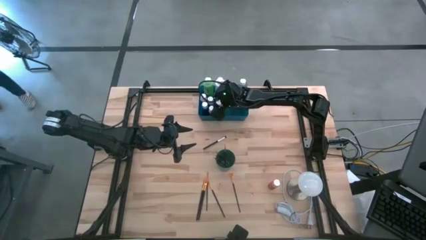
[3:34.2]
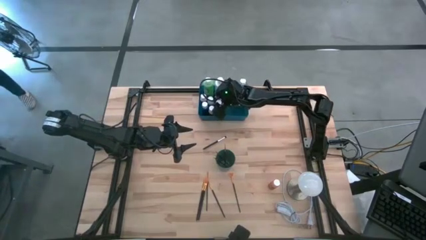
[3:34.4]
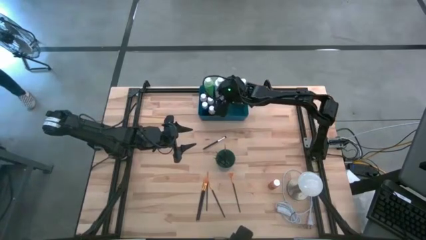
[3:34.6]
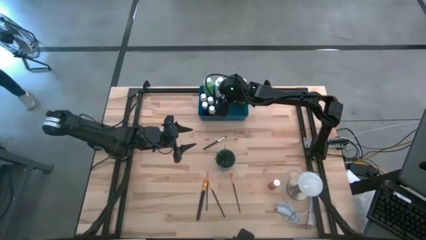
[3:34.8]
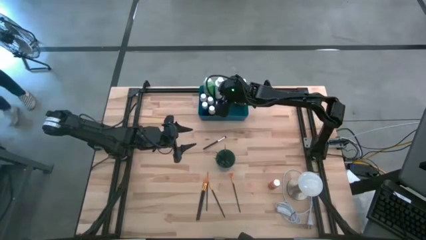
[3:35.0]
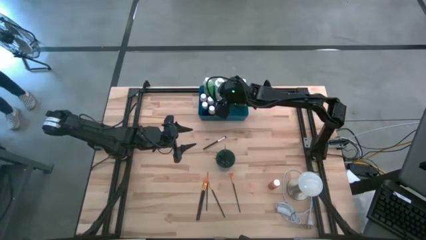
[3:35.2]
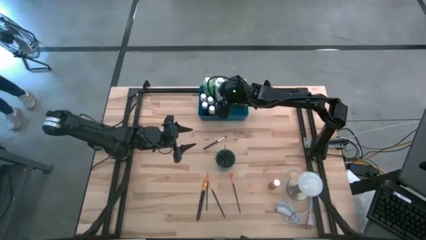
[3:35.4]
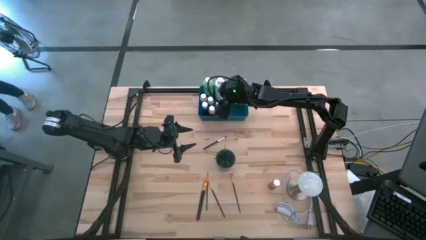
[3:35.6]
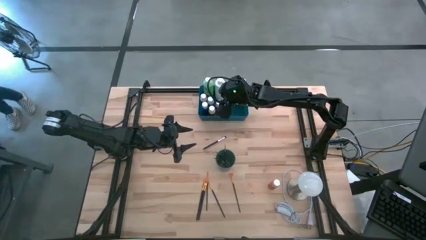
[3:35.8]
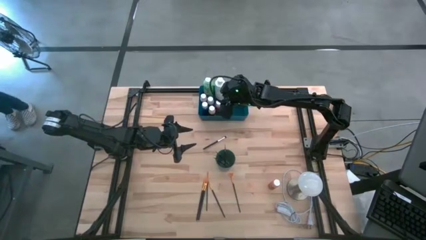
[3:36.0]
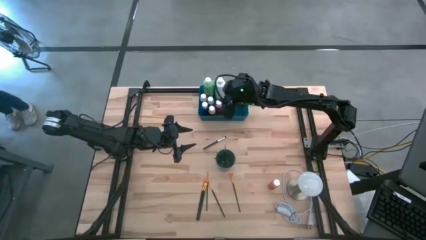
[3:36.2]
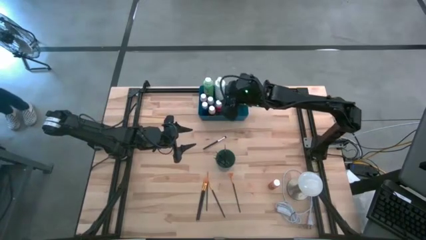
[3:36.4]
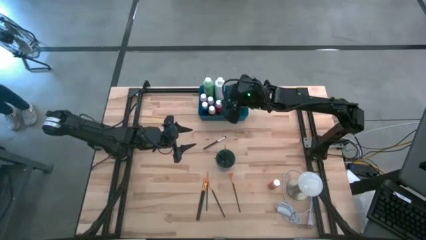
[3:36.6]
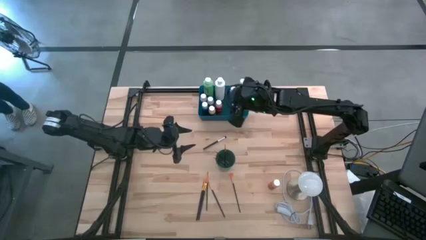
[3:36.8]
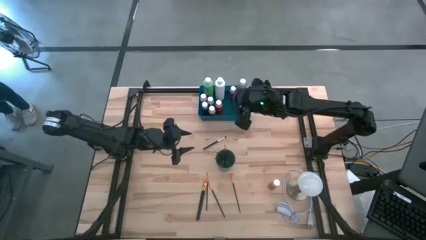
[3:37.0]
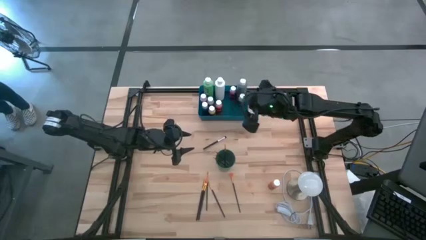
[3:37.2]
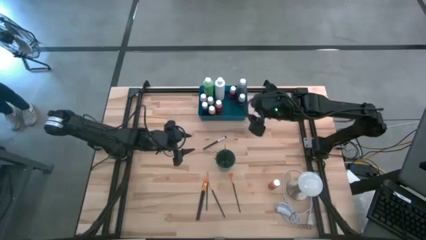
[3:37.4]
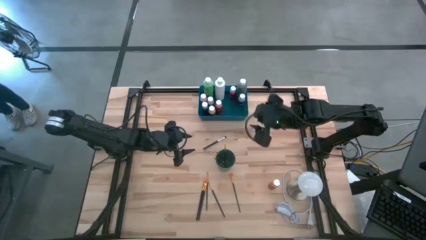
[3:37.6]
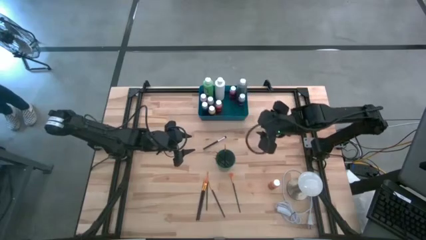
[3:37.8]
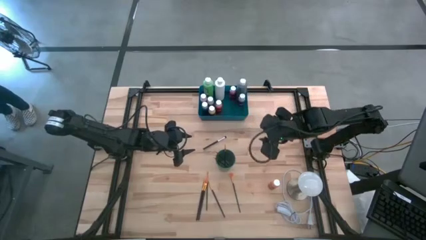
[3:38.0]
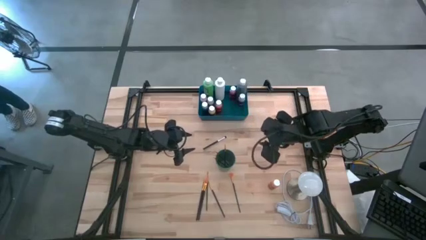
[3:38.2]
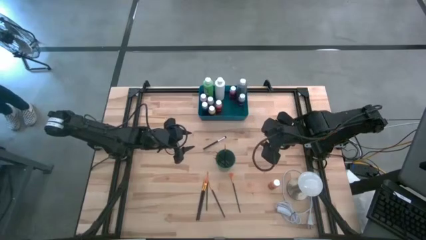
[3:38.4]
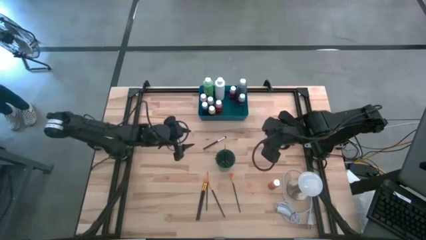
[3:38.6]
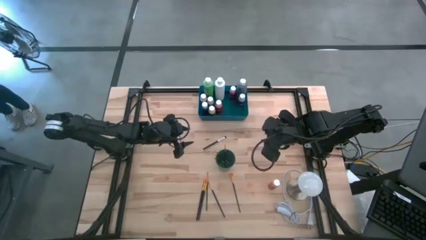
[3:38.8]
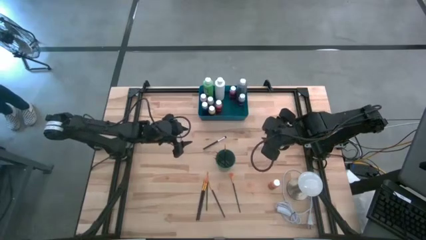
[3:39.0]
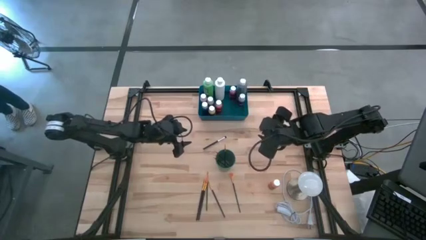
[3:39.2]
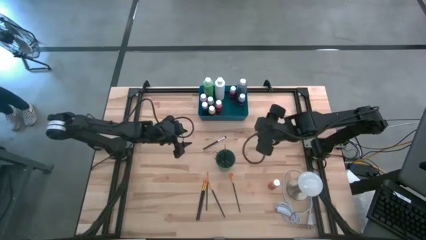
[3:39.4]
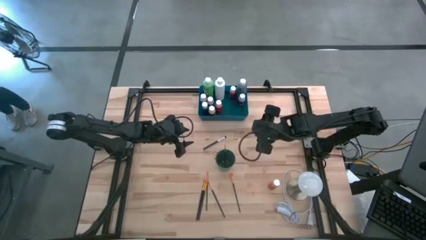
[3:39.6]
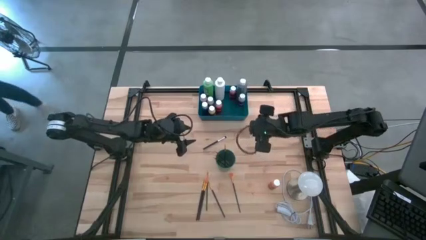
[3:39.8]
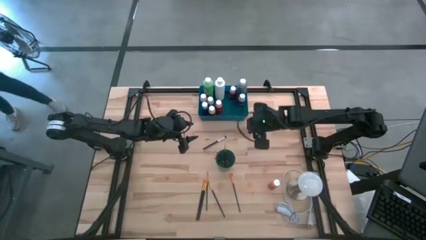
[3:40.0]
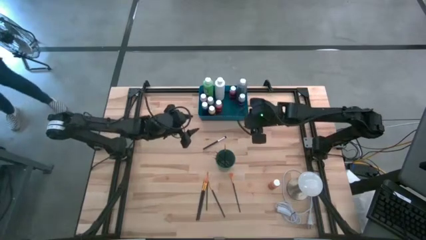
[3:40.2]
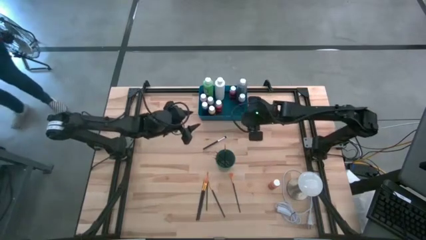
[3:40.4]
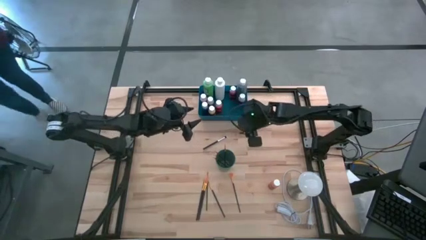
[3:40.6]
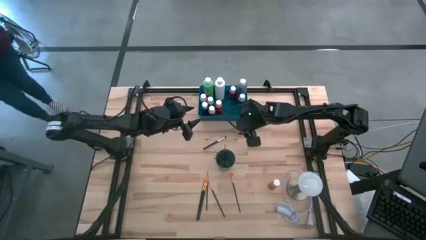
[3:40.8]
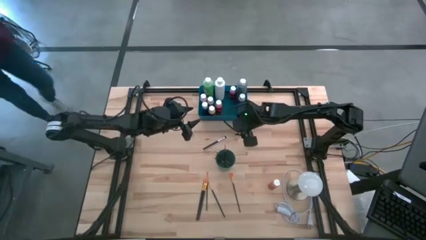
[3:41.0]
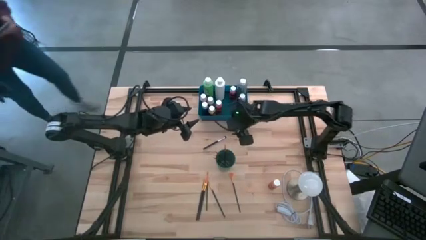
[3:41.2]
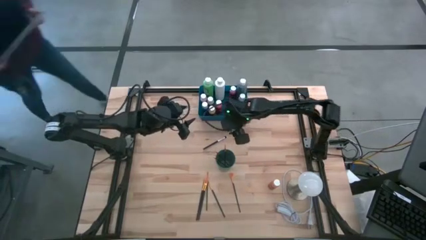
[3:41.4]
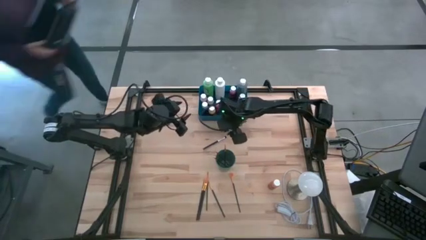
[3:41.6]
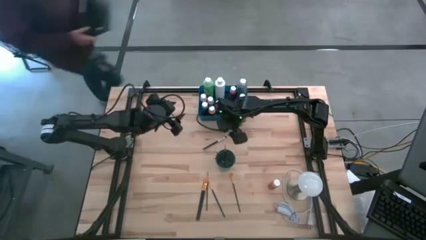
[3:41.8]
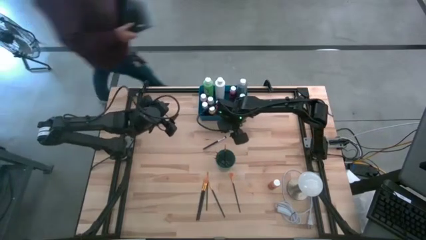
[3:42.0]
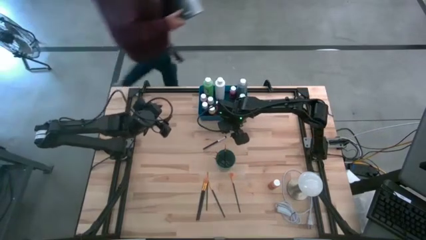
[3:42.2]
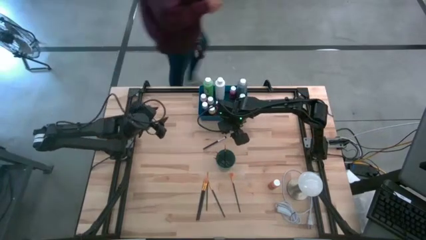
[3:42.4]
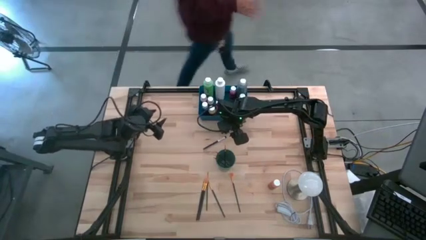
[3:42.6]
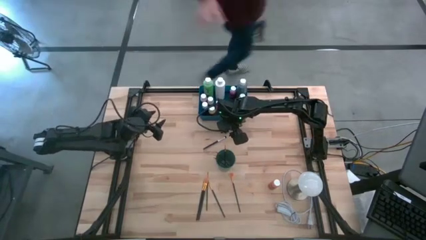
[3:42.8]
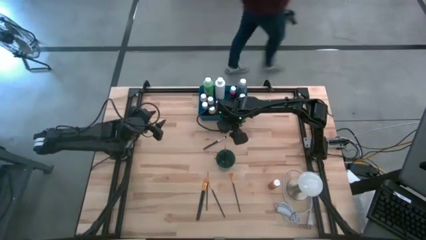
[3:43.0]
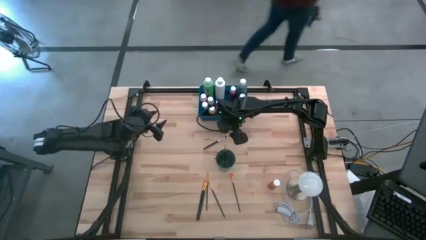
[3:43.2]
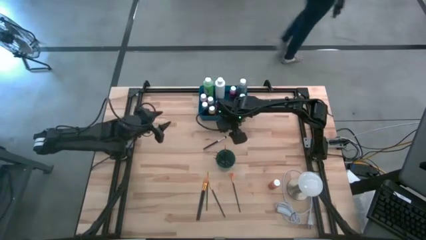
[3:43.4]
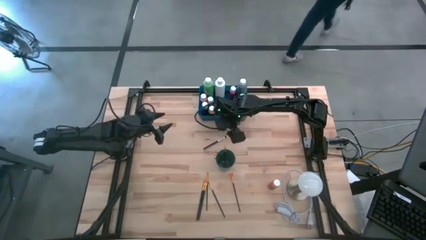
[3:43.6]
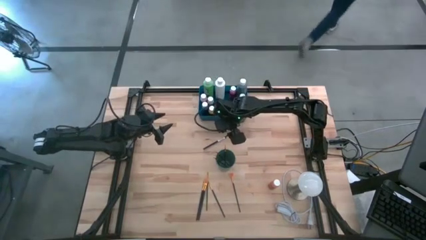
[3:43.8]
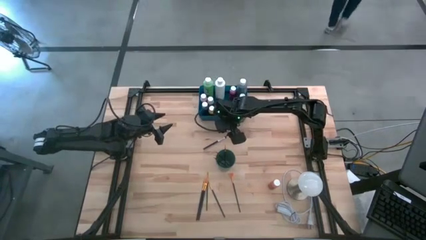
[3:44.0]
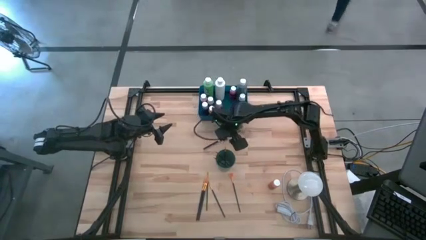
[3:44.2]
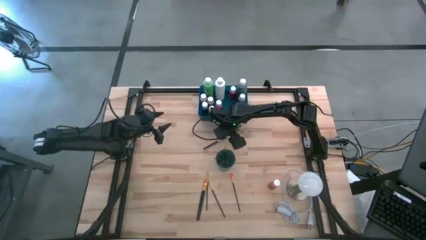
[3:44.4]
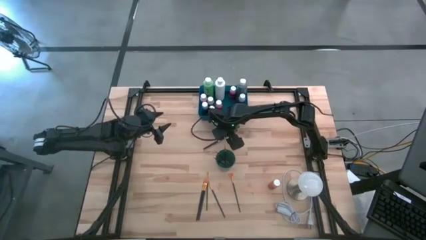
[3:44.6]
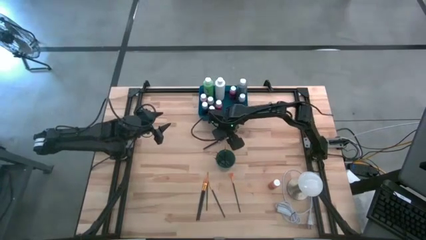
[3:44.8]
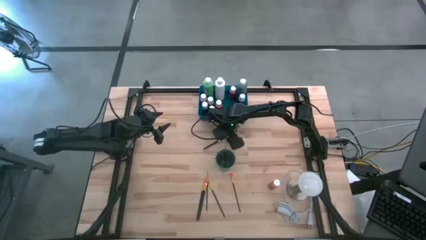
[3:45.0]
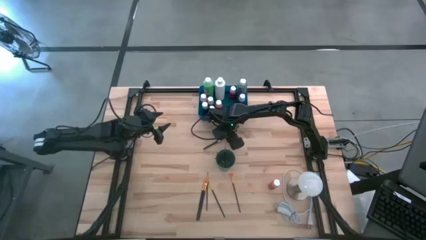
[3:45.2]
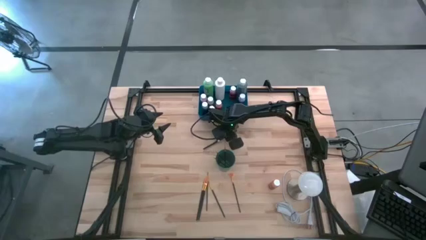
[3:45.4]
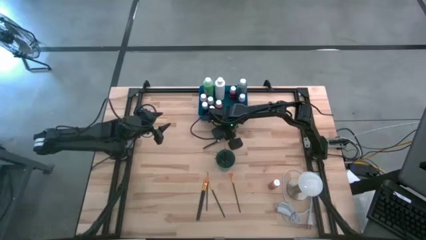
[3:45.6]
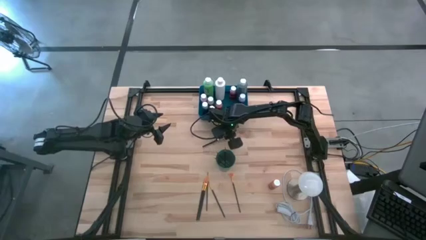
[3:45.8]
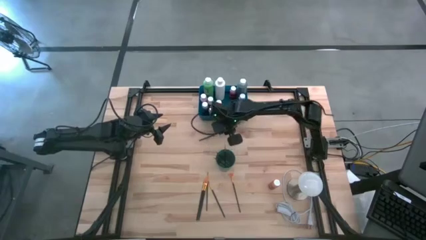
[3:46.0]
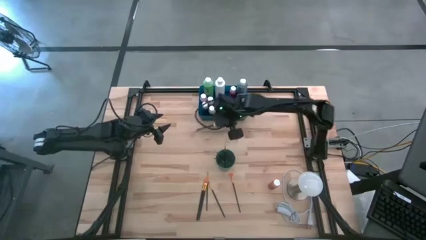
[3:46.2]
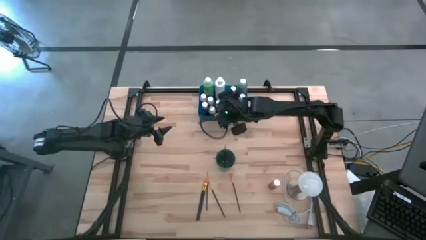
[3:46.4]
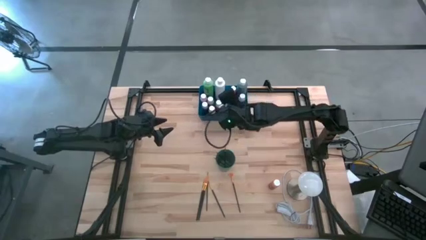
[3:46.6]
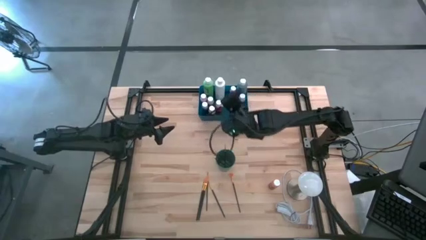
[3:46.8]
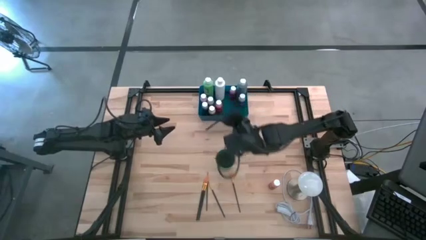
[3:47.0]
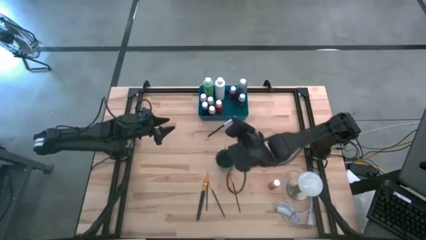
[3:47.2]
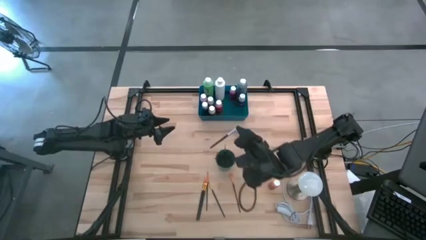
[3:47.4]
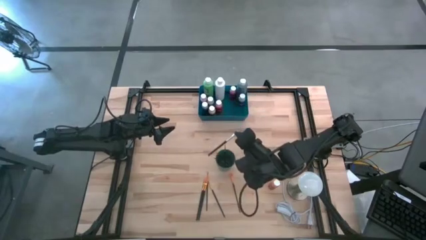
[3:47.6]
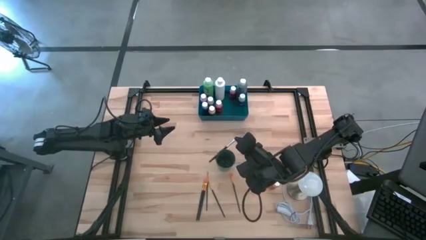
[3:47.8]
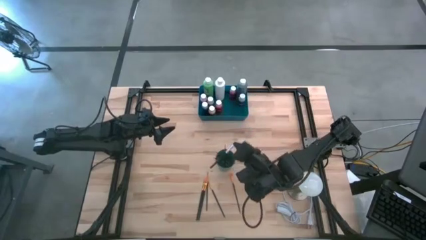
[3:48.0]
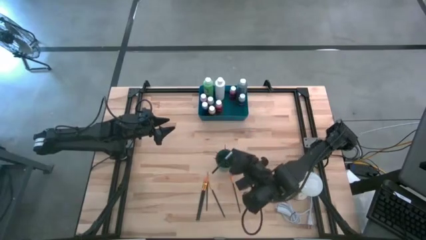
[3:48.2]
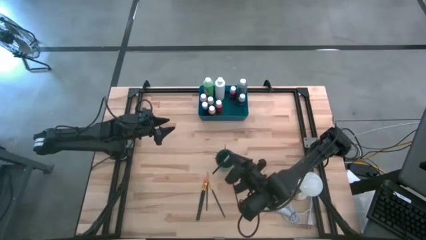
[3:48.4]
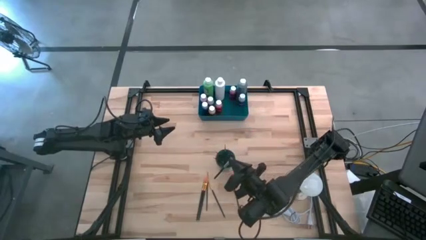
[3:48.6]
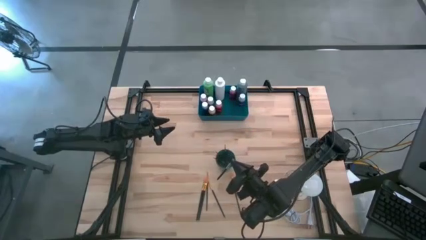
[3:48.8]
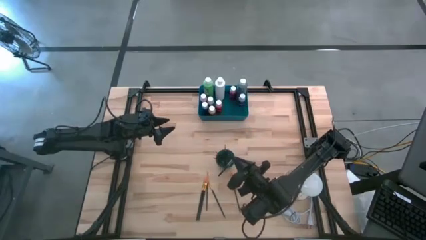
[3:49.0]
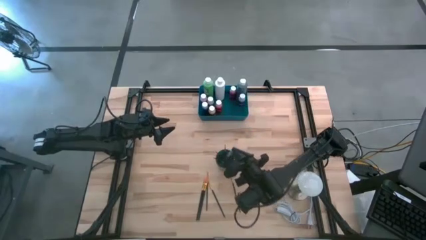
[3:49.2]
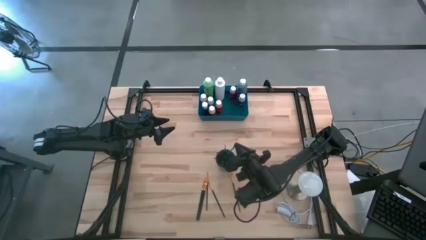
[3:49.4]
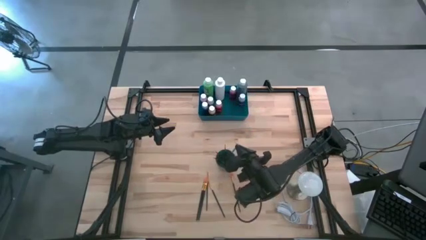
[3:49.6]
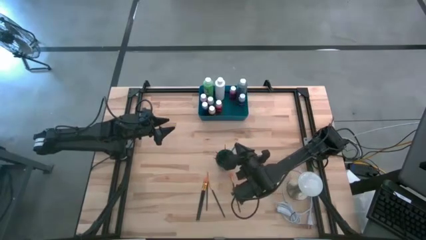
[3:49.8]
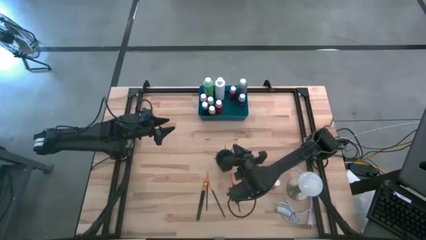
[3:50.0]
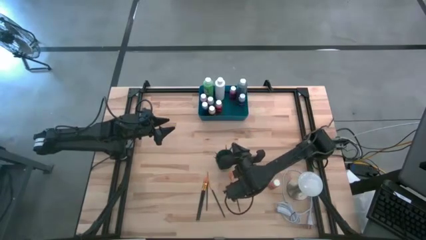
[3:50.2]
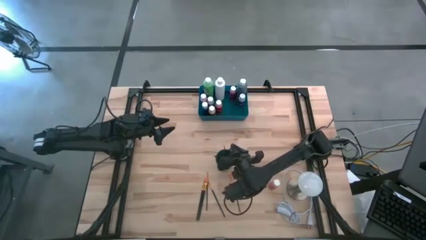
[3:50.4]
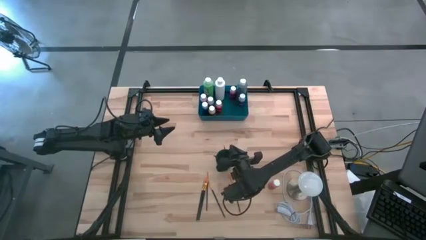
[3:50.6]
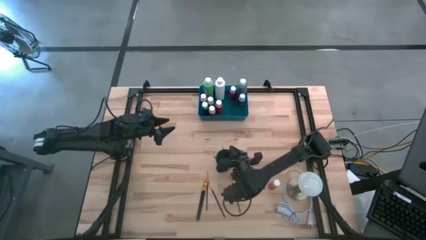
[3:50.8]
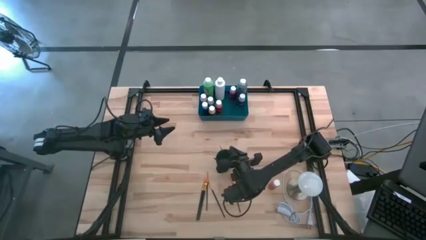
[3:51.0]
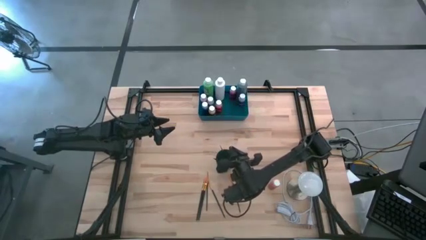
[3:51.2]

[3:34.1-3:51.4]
Task: Pick & Place Paint Supplies
Put the white paint brush into the green cup
